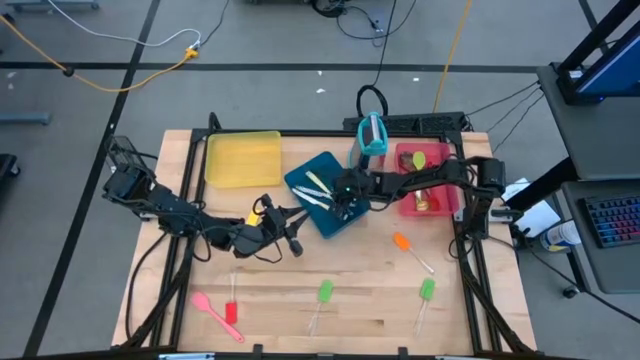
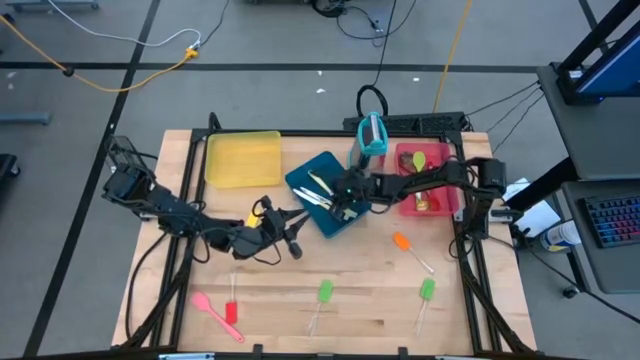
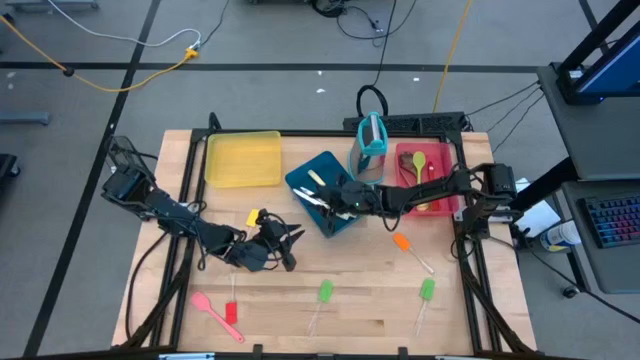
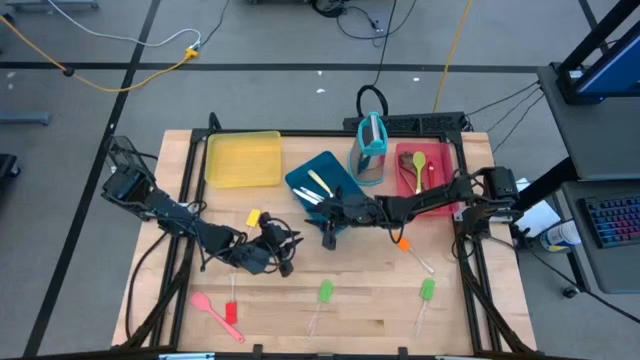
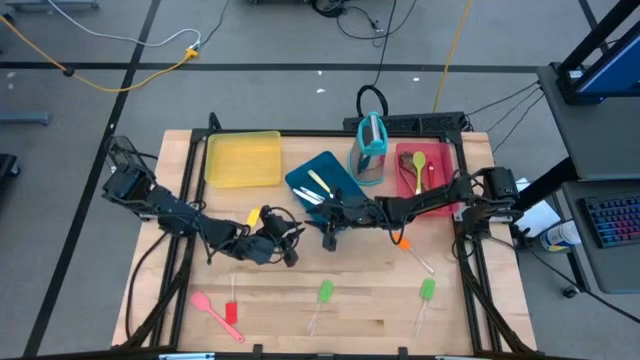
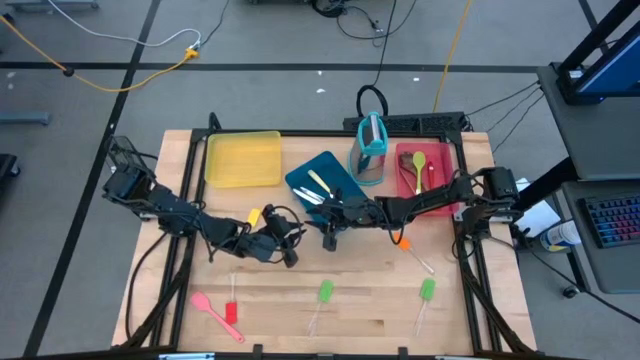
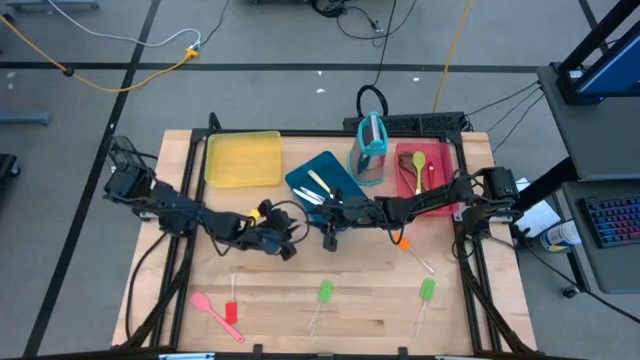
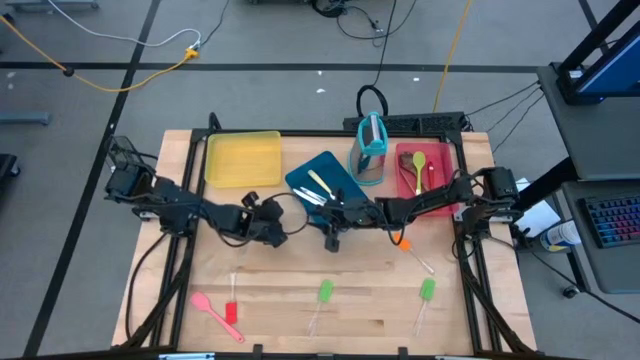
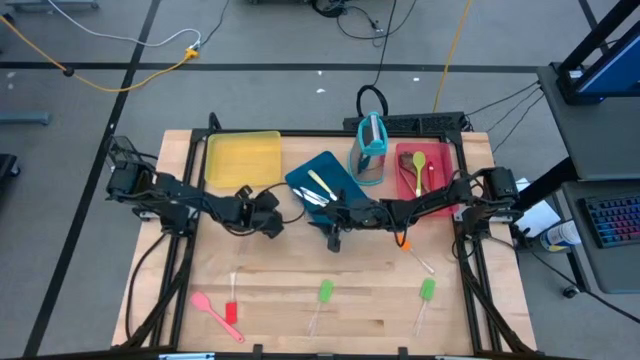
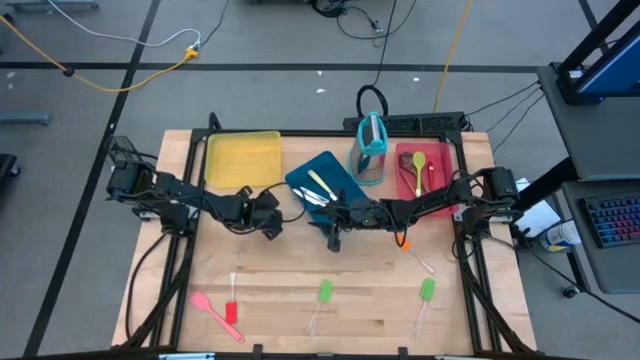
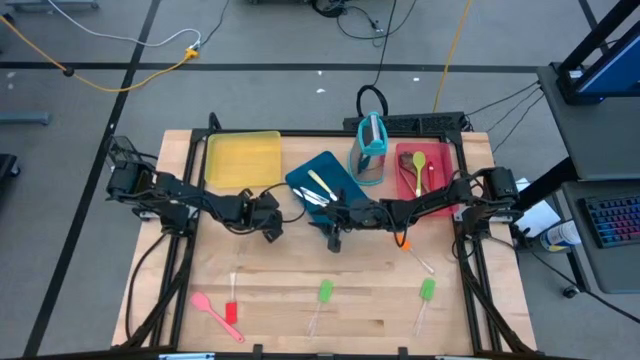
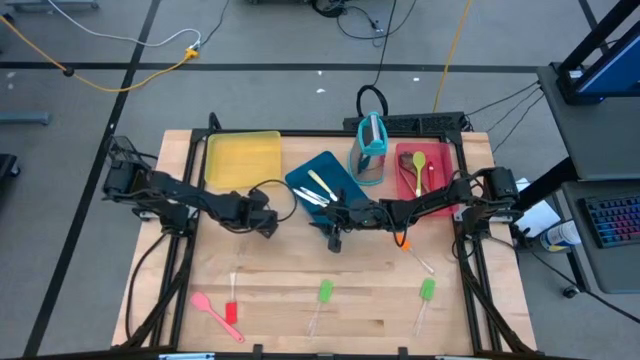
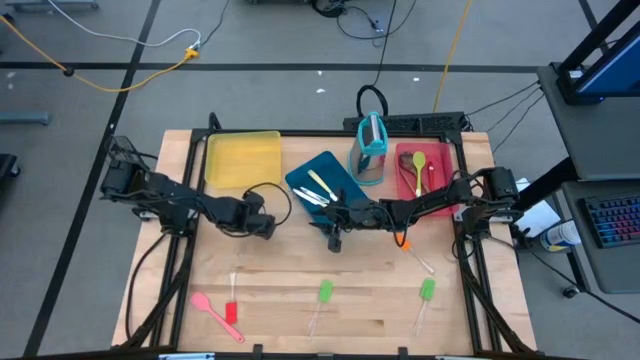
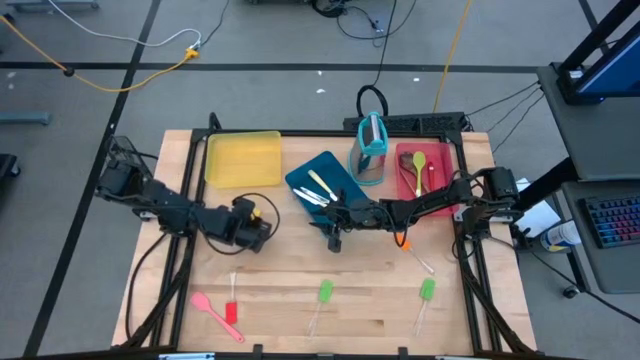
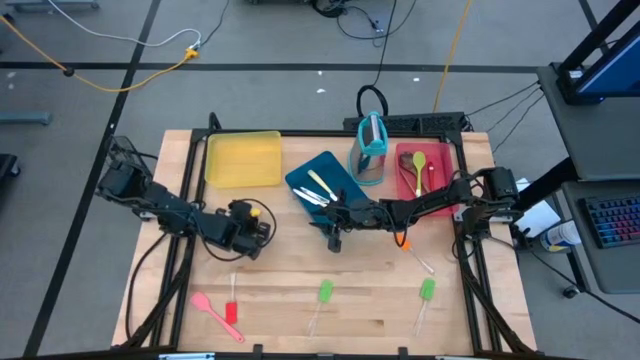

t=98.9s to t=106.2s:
Task: Pick & Place Kitchen Items
Put the yellow spatula into the yellow bin

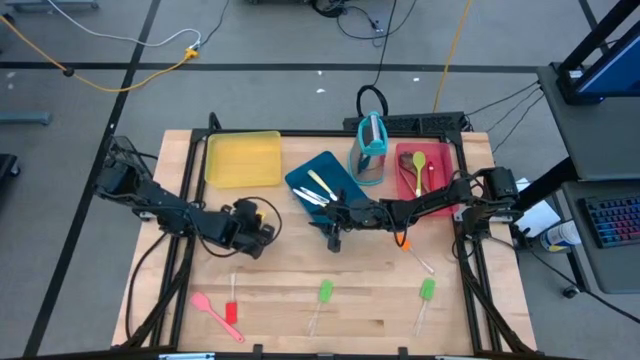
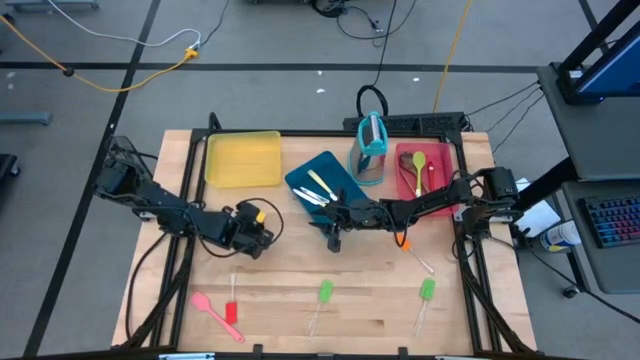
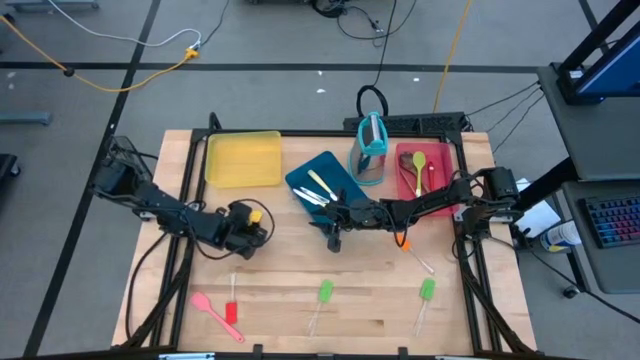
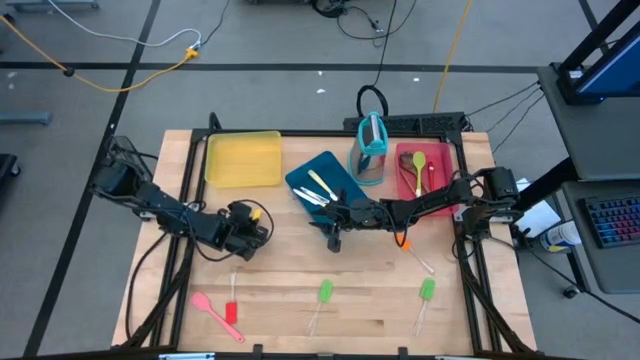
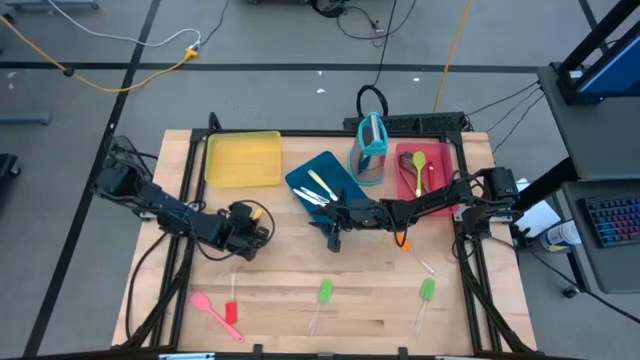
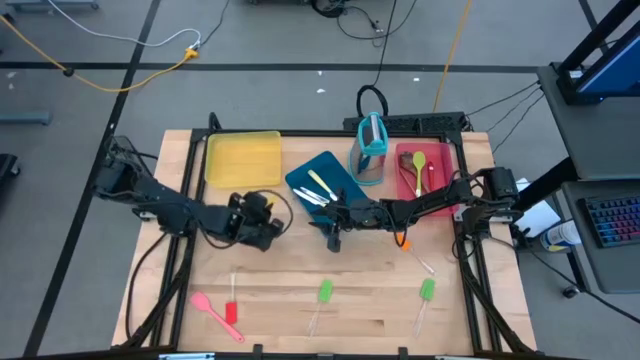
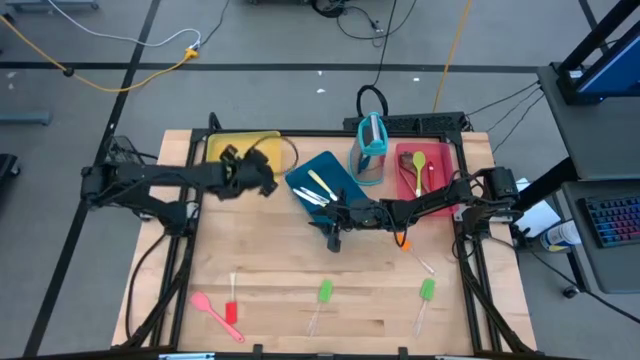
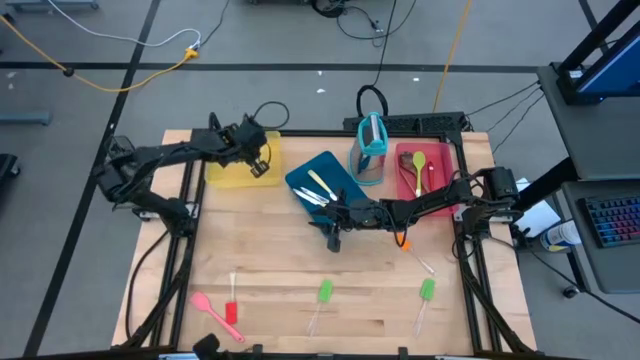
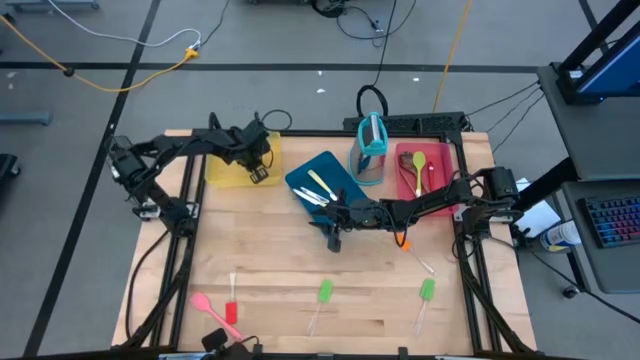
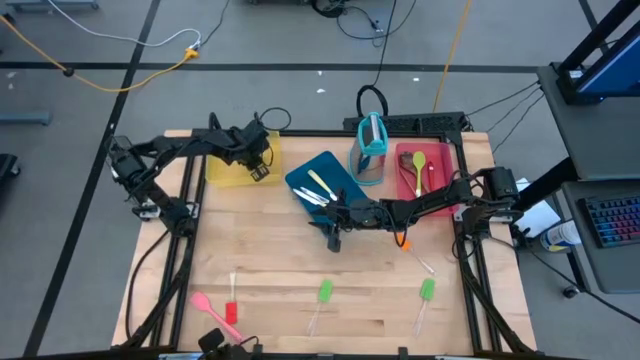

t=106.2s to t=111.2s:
Put the yellow spatula into the yellow bin

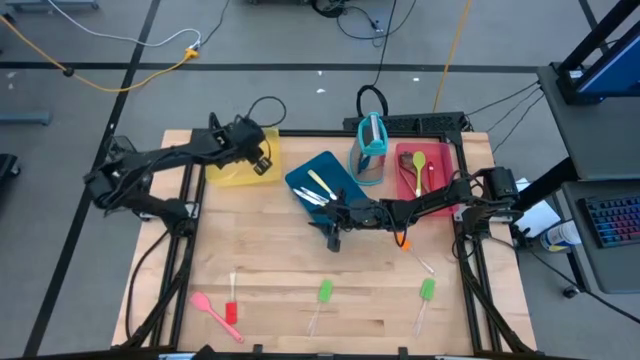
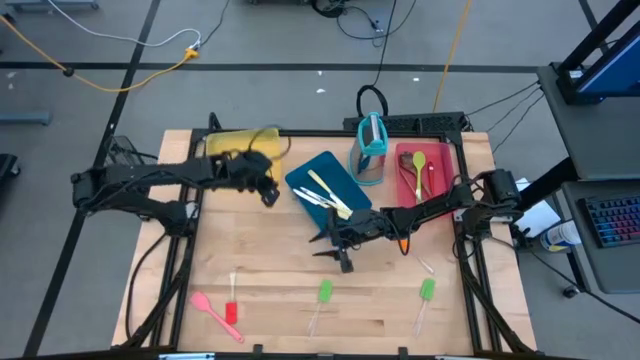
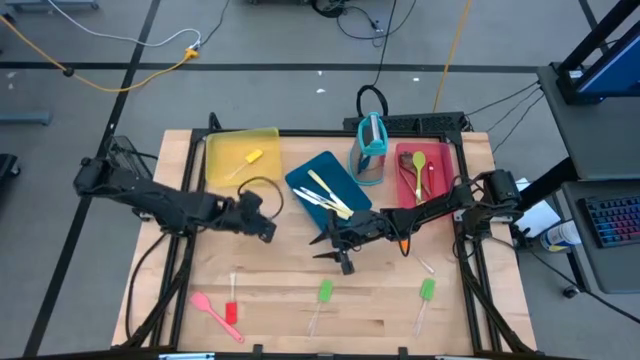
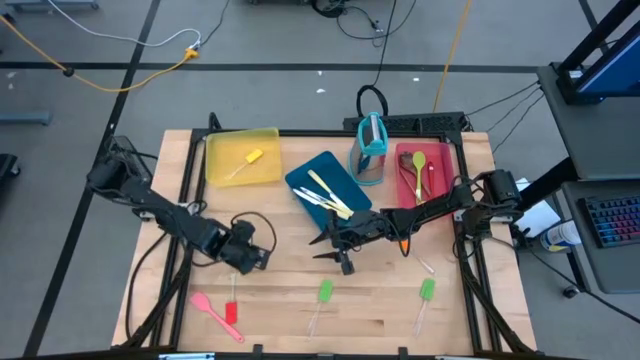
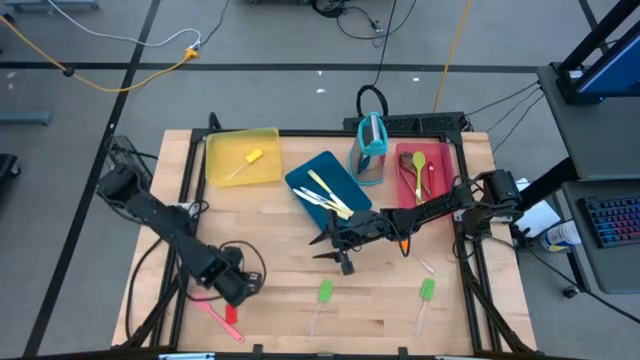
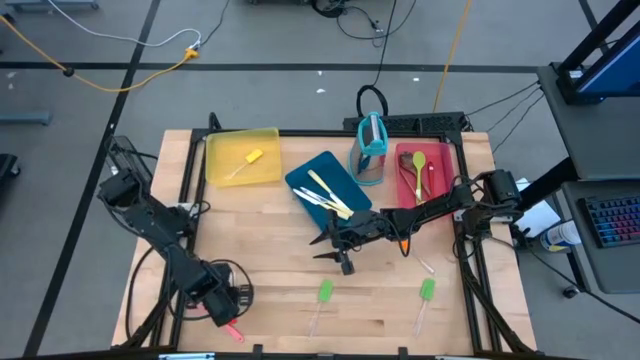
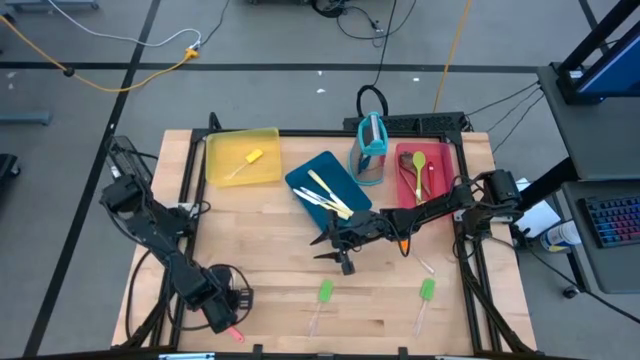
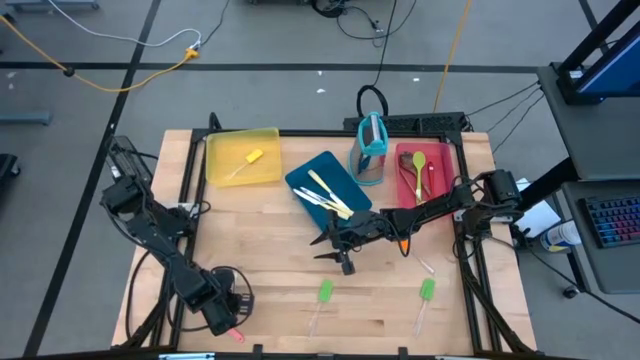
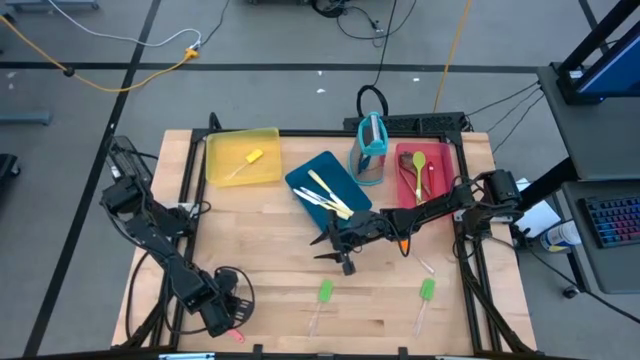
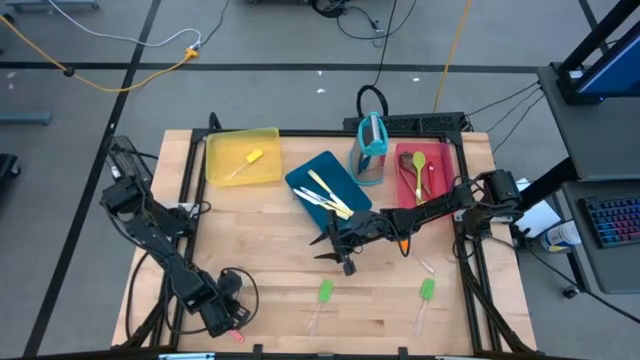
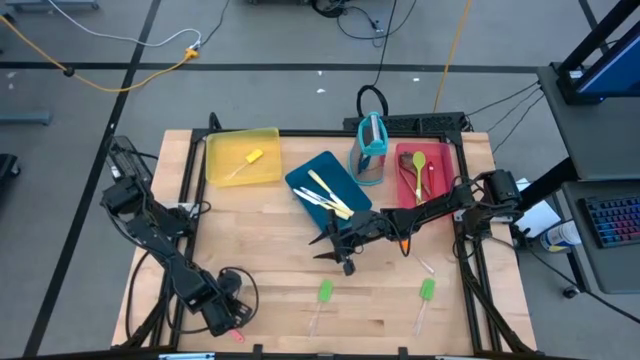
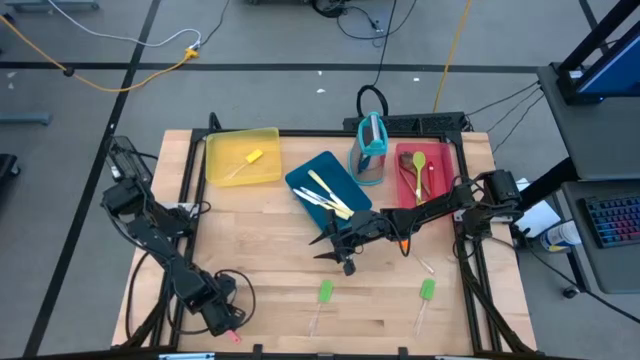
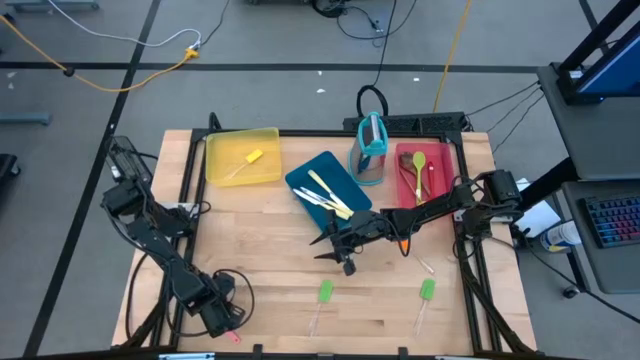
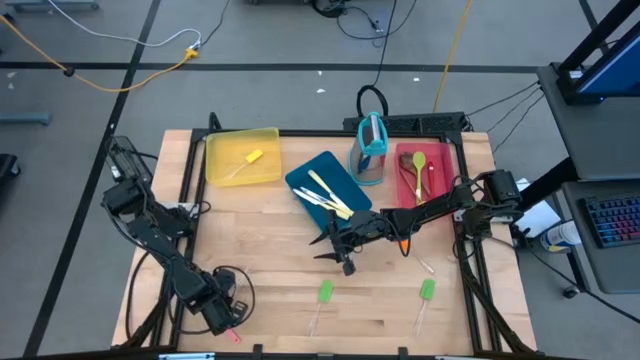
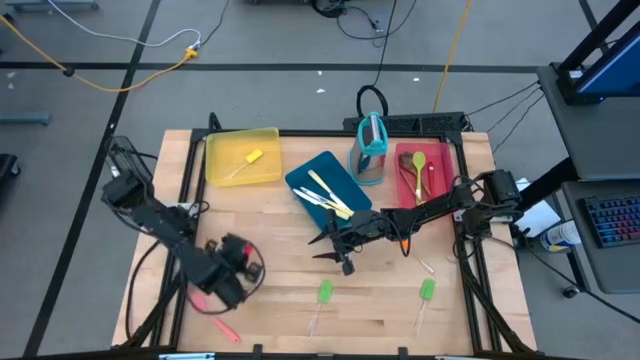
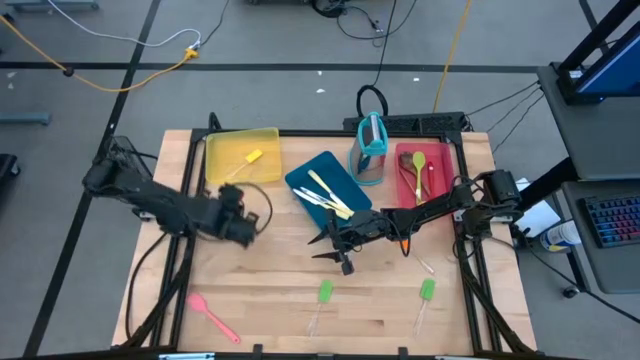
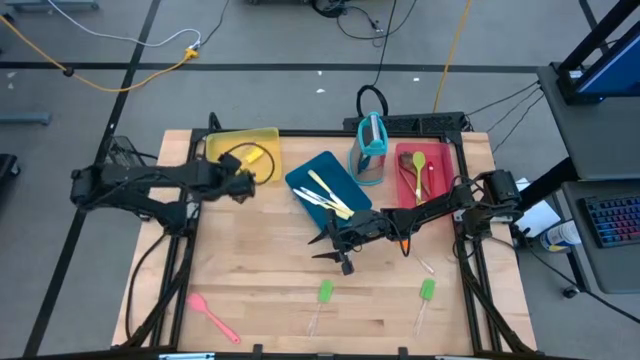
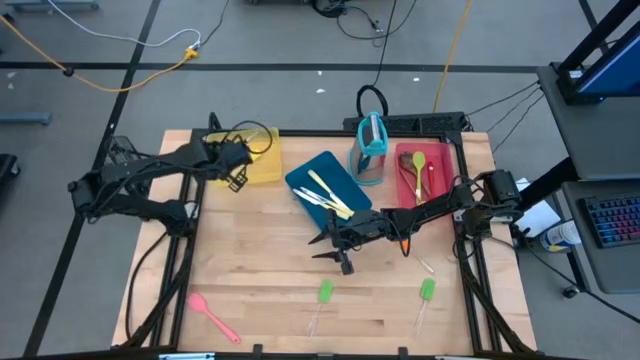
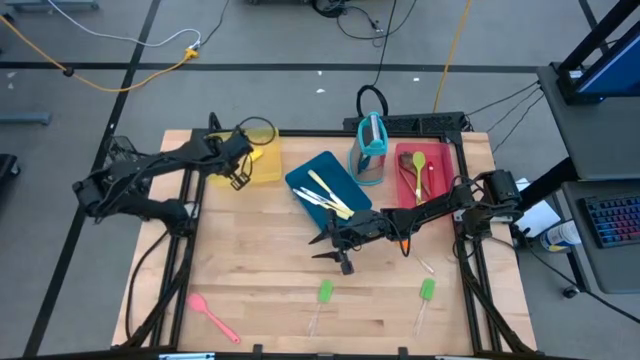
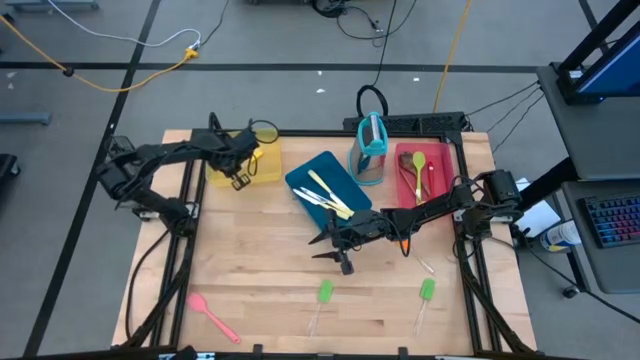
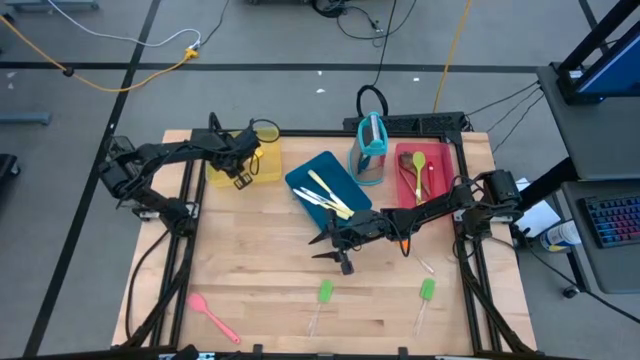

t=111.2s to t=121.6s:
Put the red spatula into the yellow bin
